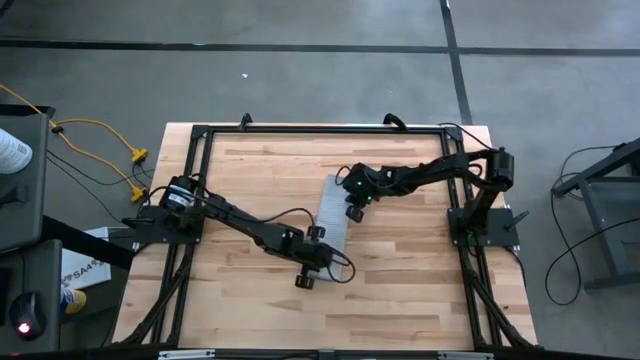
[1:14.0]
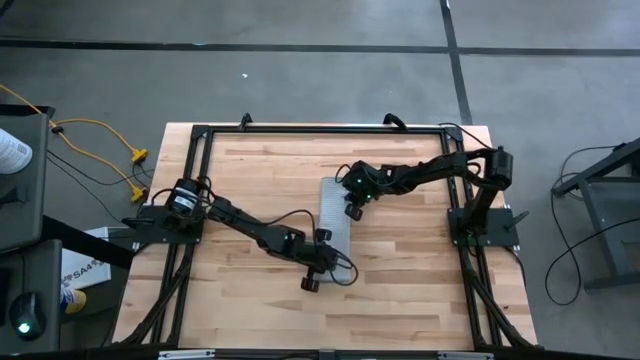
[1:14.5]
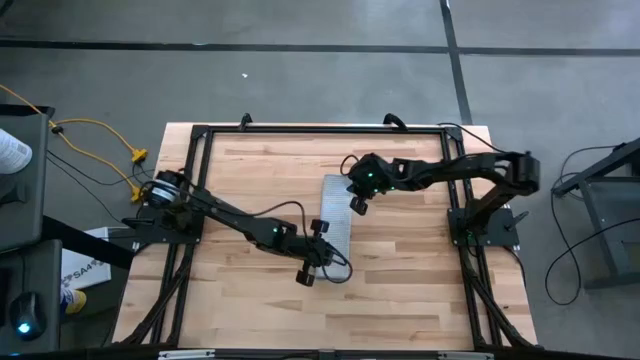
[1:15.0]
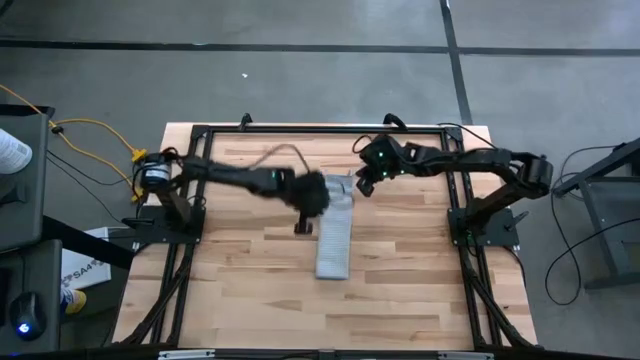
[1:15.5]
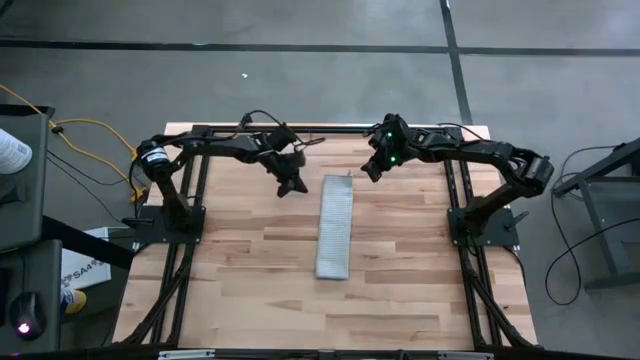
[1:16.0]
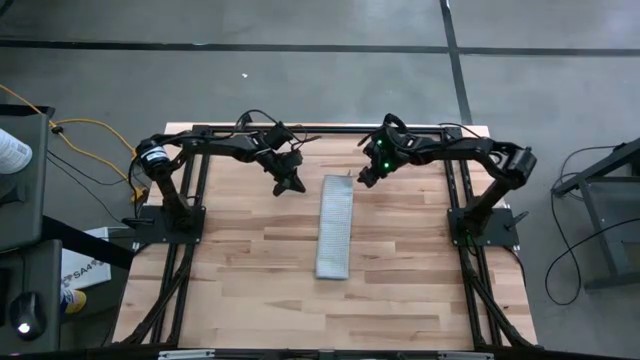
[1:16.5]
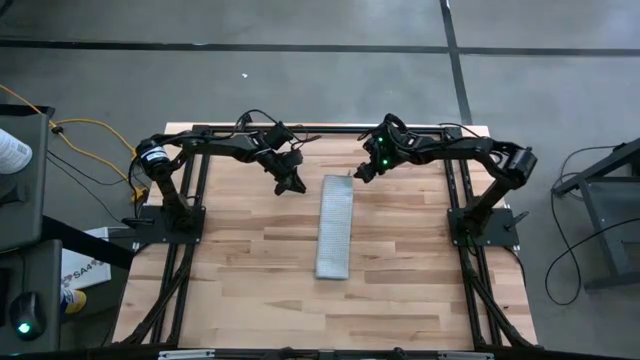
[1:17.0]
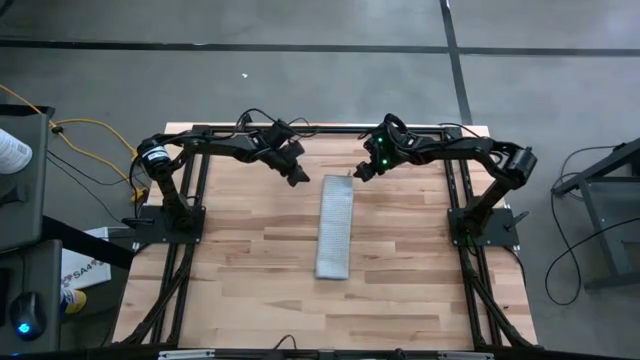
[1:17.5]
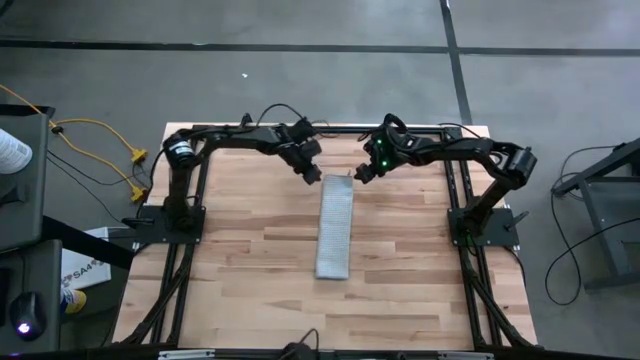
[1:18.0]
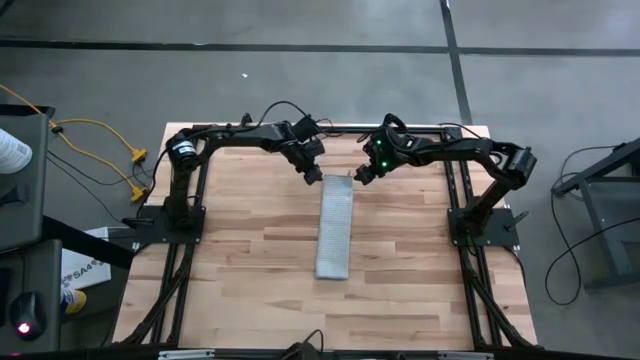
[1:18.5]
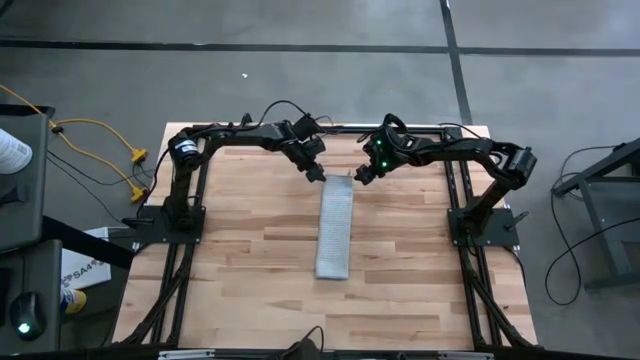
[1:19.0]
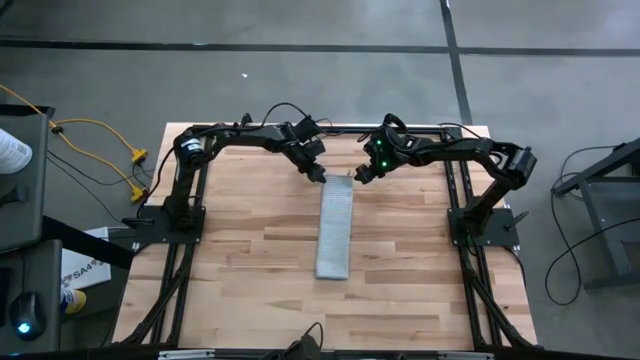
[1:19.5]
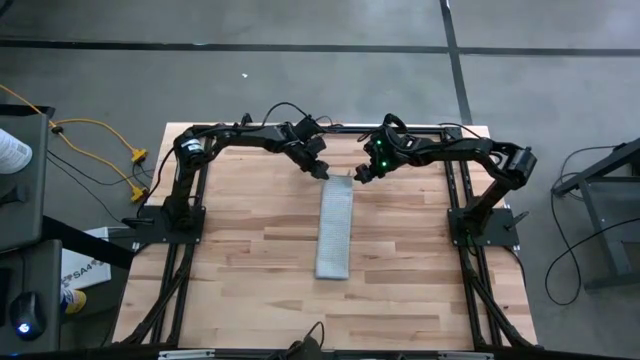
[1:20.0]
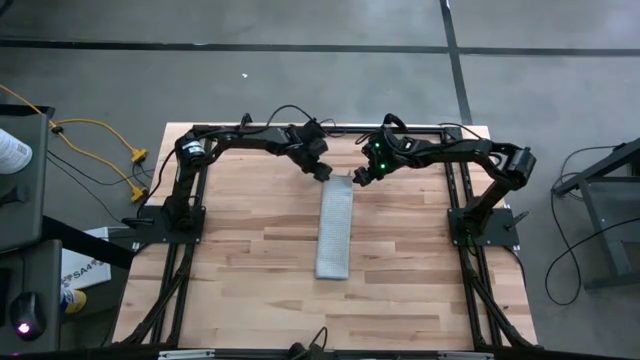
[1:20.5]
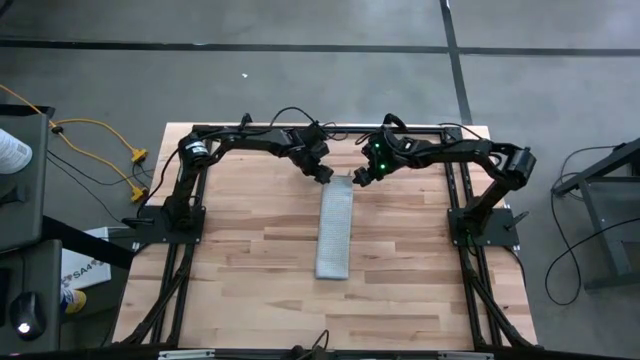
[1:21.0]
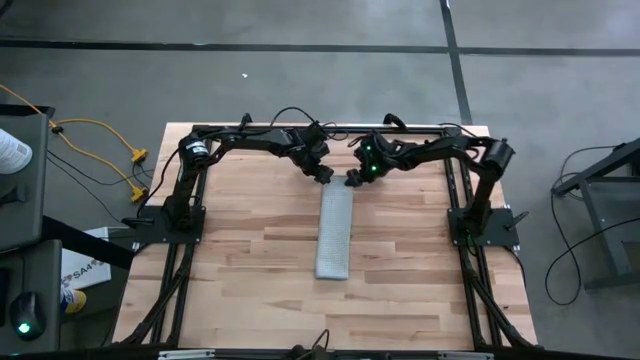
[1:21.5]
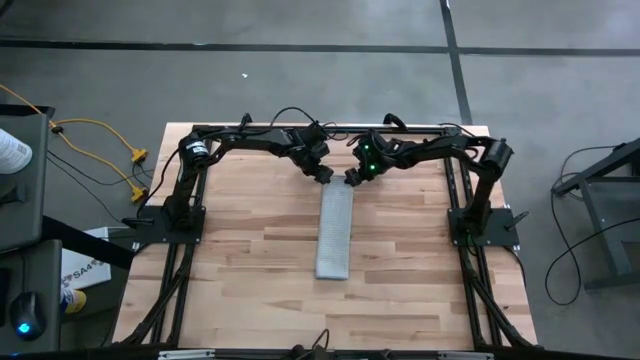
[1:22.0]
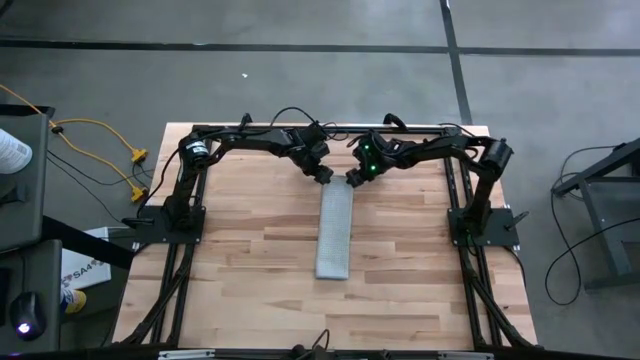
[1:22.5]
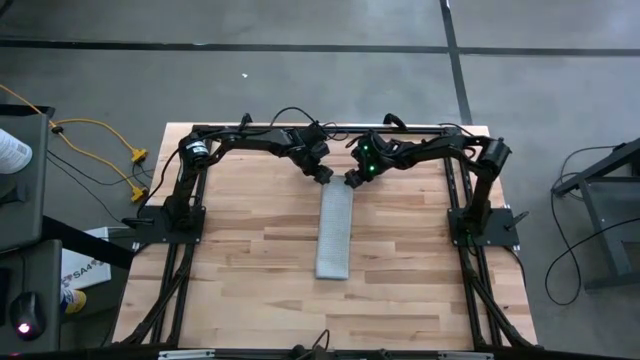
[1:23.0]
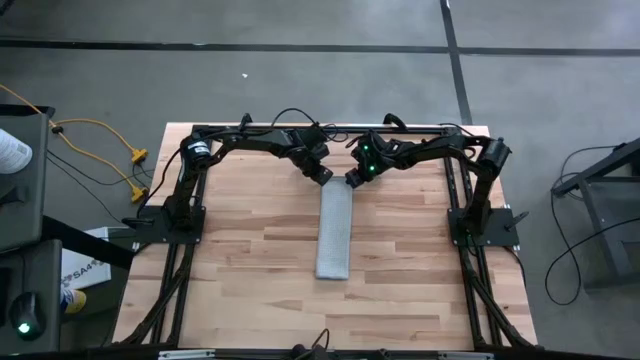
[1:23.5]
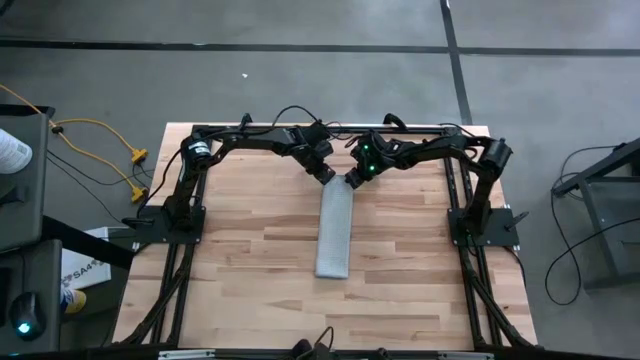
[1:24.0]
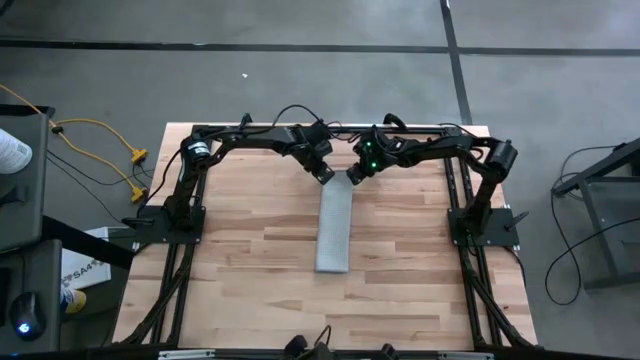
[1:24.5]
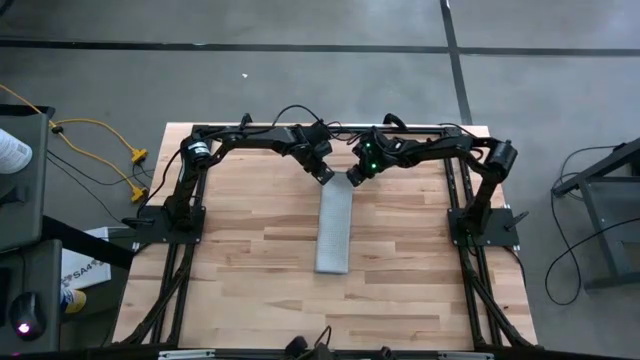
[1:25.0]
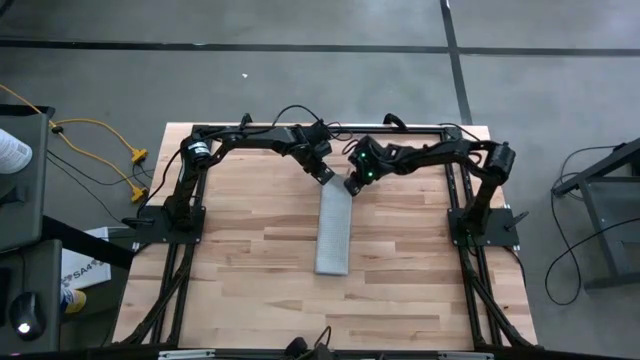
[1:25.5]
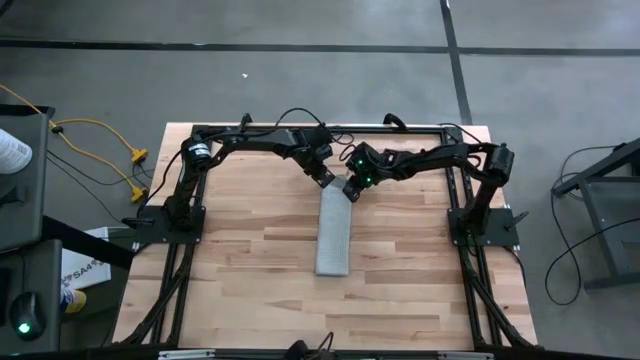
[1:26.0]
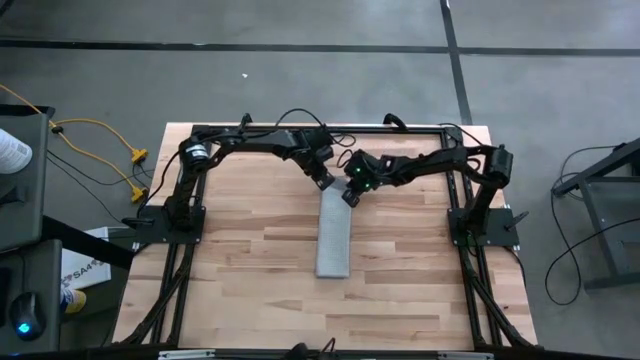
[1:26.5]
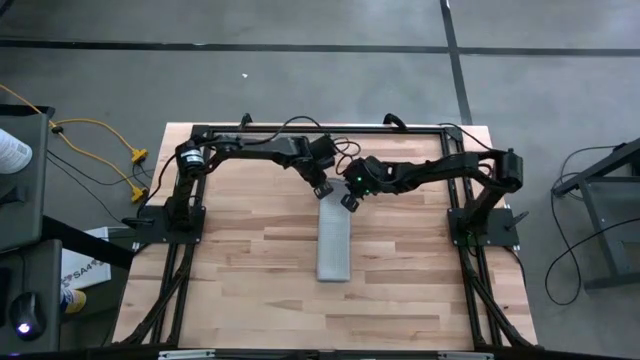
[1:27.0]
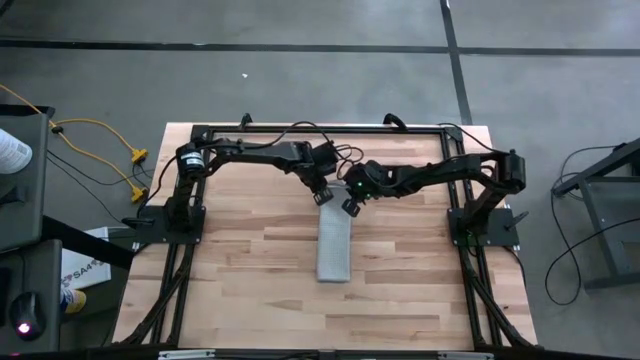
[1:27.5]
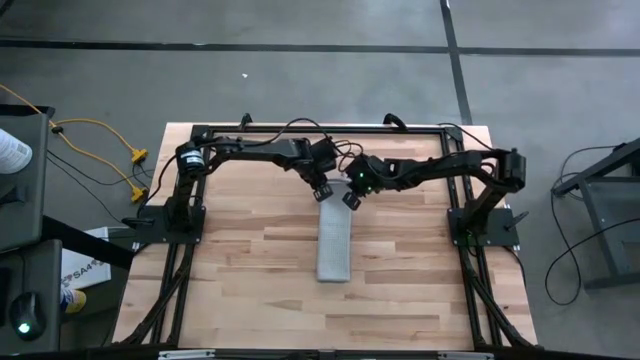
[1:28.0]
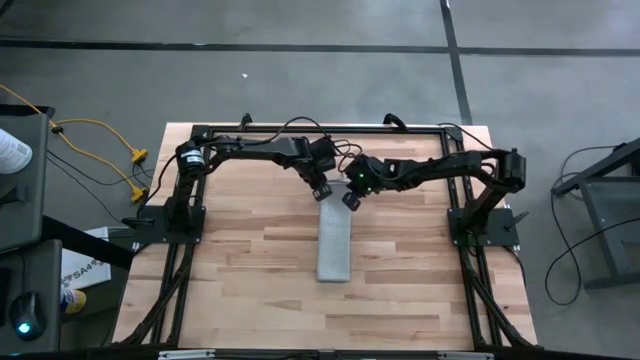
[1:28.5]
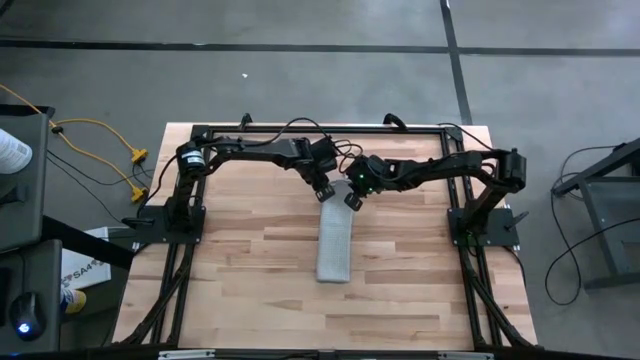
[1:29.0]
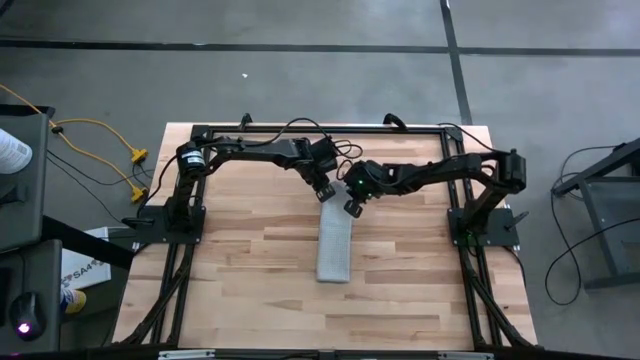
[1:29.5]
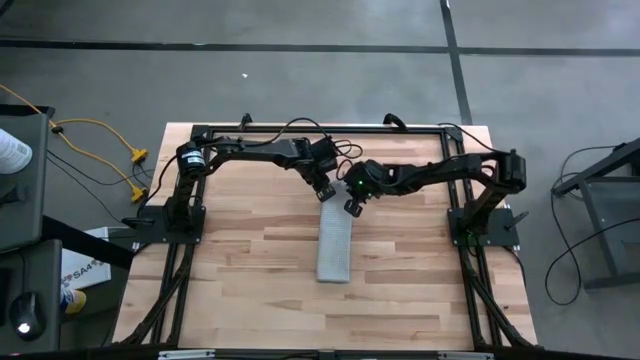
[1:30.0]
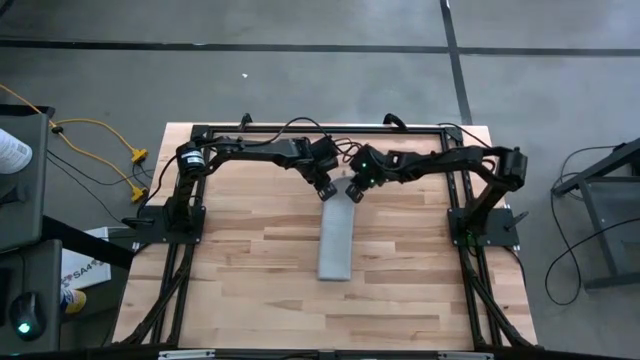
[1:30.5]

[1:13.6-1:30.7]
Task: Fold microfiber towels
Fold the gray microfiber towel

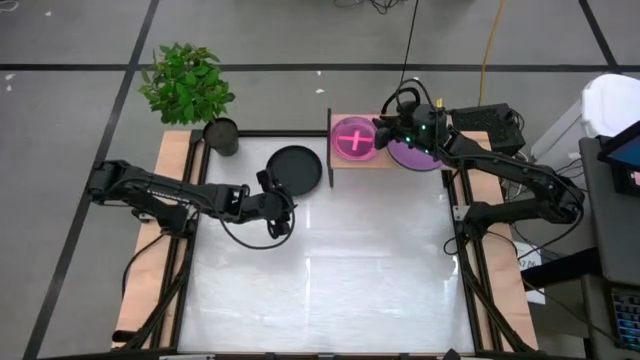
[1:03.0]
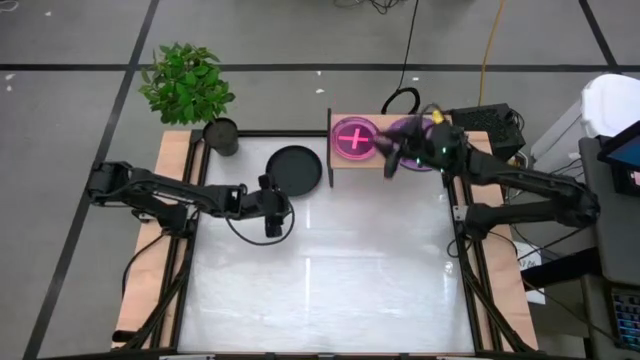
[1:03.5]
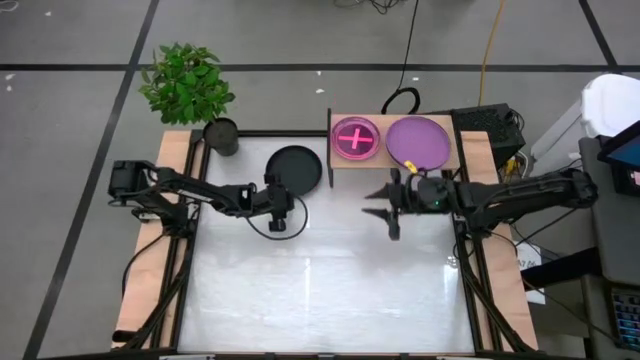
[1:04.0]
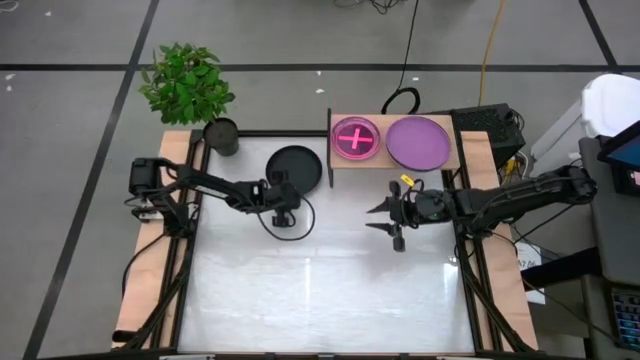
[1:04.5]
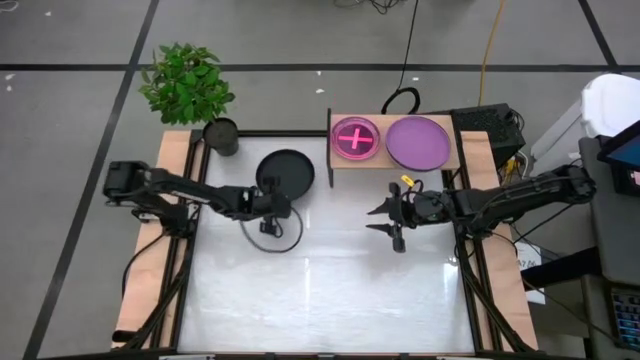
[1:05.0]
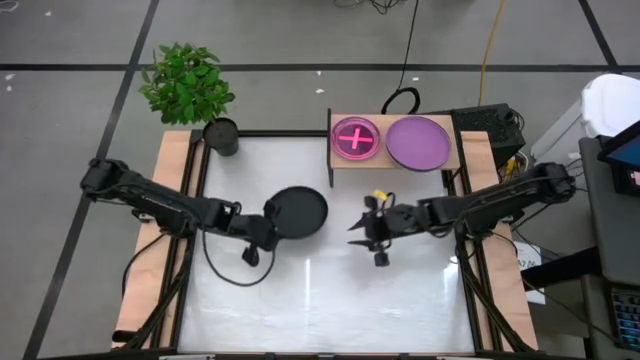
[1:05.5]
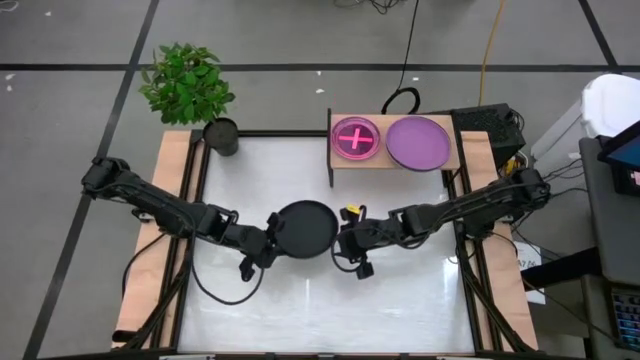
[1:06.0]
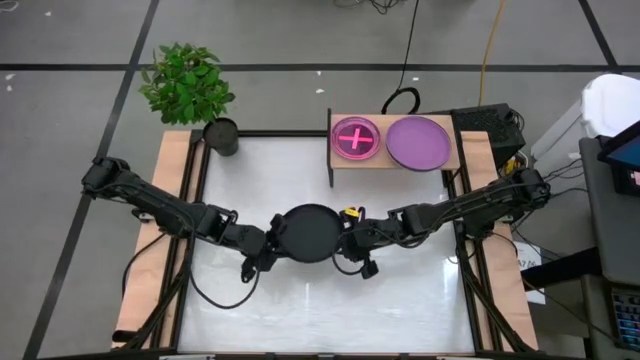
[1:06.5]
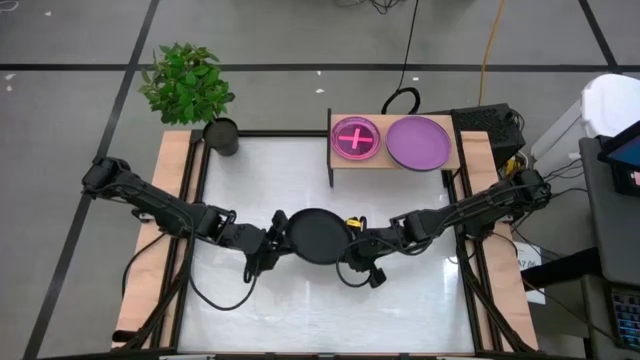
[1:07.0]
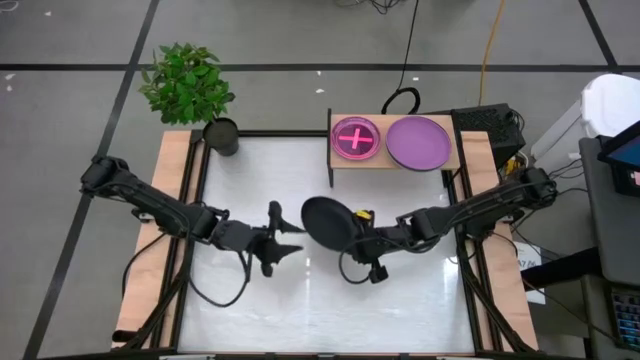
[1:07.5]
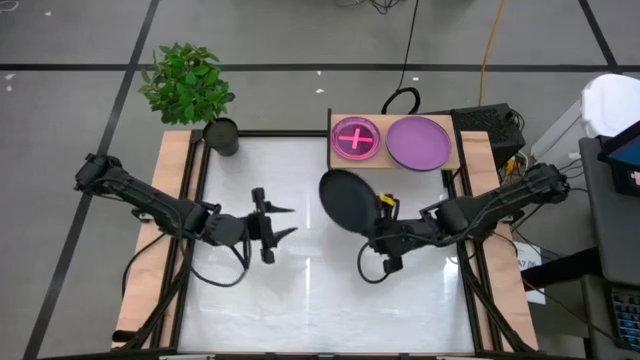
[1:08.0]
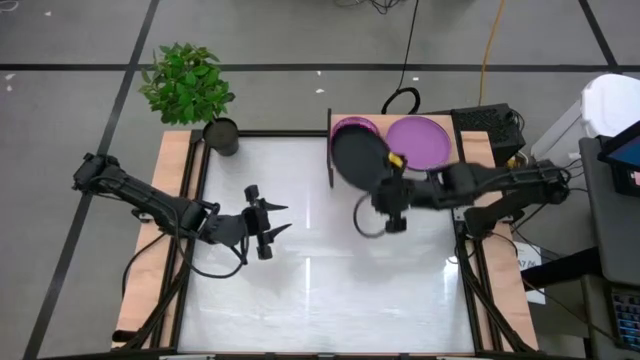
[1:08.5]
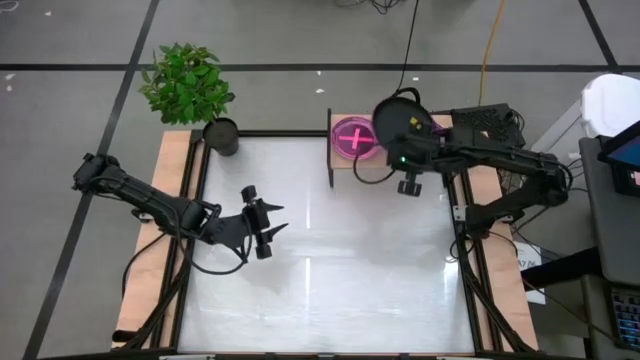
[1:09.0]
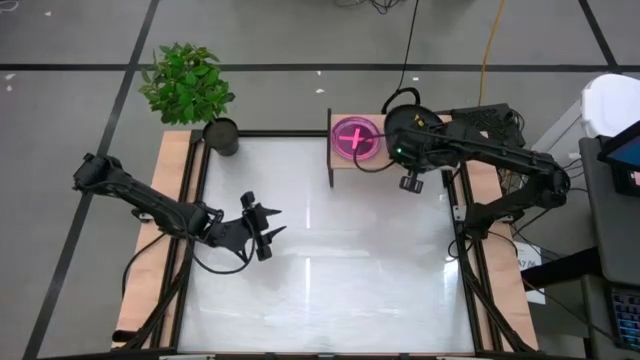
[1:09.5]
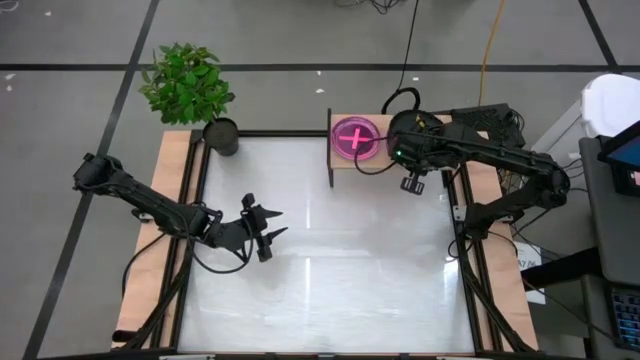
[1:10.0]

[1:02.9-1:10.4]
Task: Place and stack plates onto a shelf
Stack the big black plate on top of the big violet plate on the shelf
